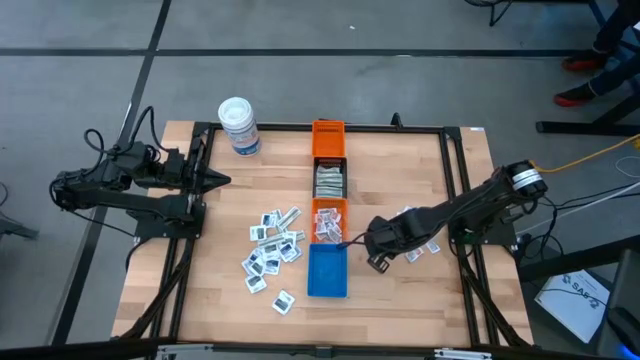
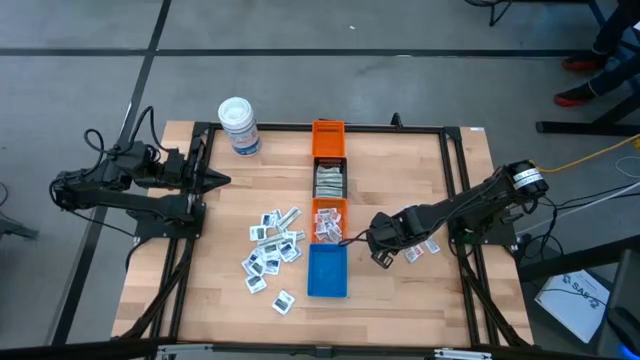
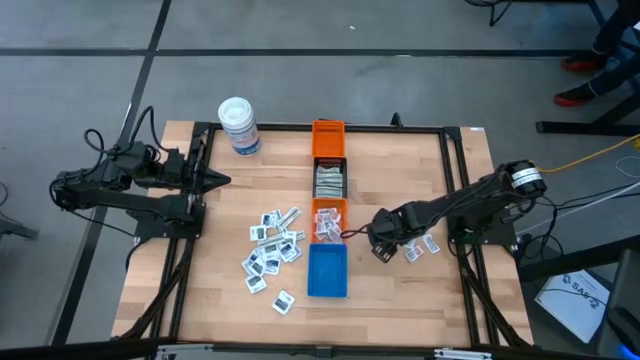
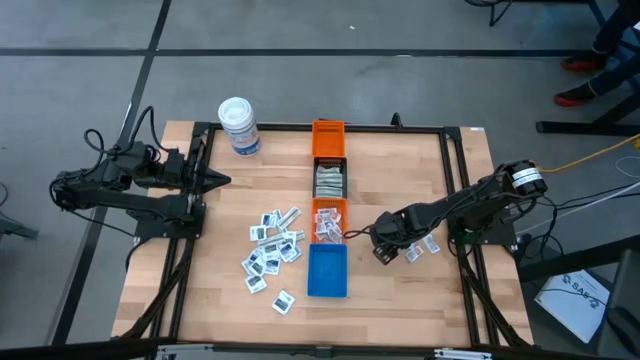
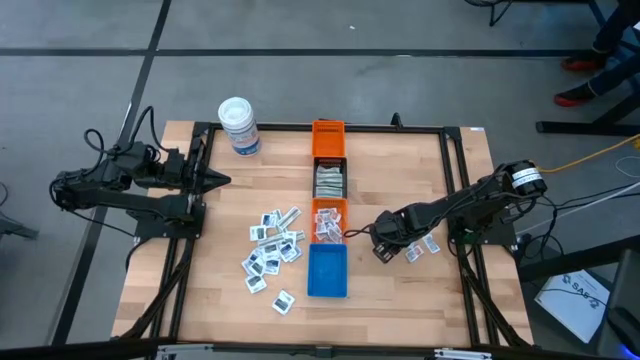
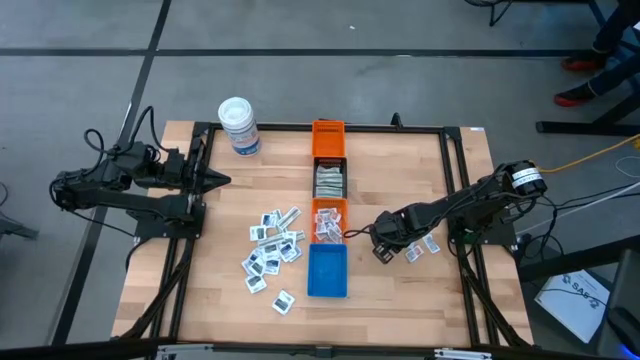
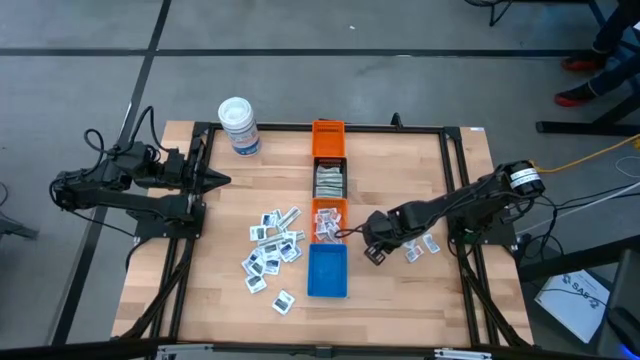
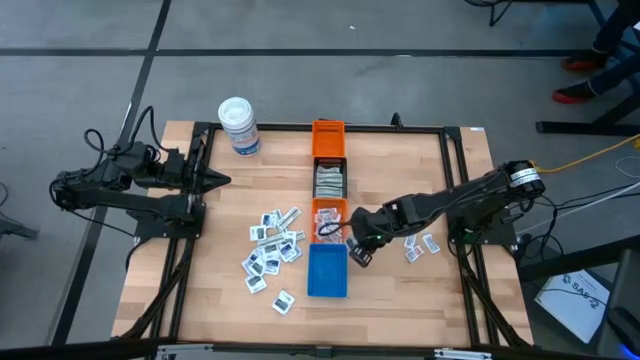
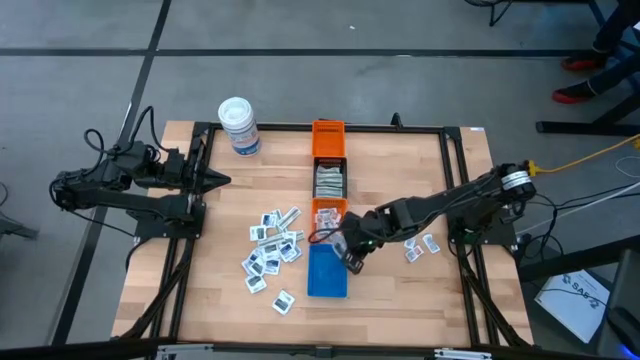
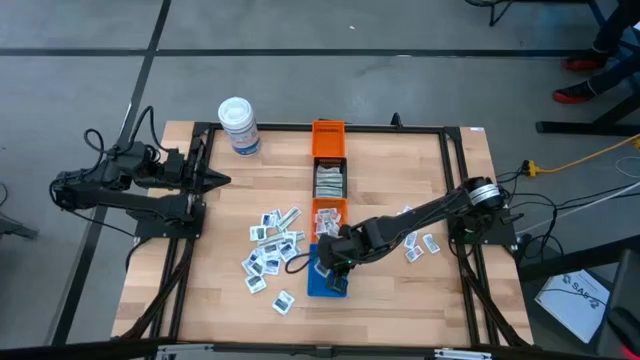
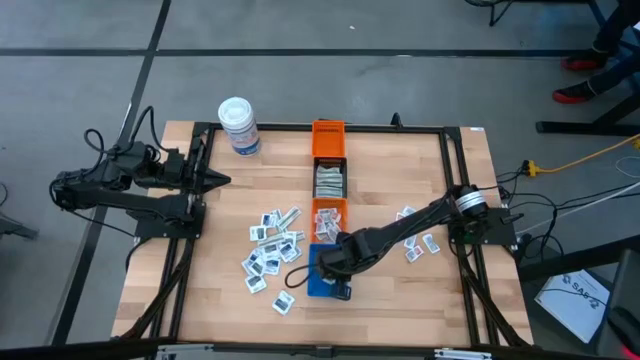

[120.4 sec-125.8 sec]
Task: Pick & Place First Aid Supplies
Put the gray towelette pack into the blue bin

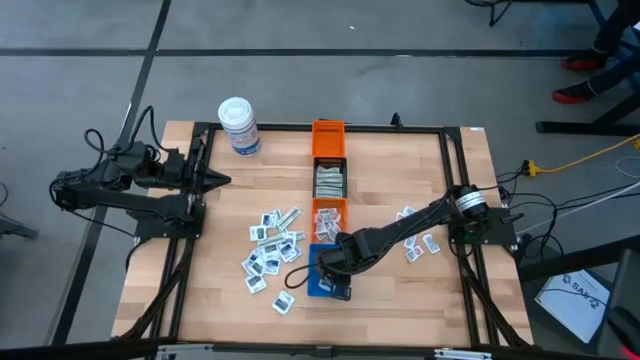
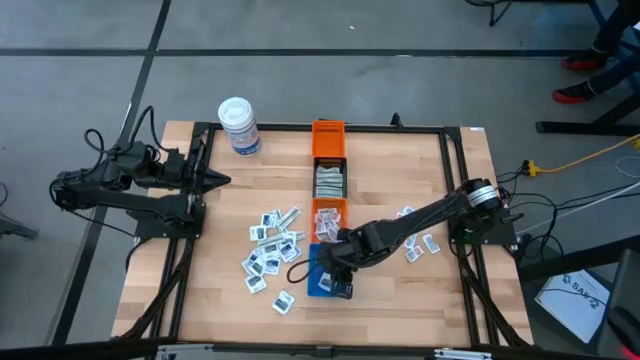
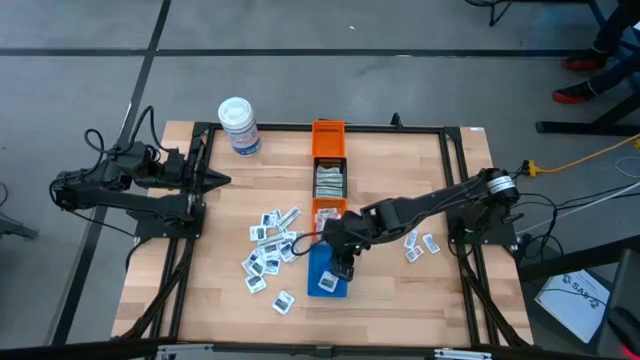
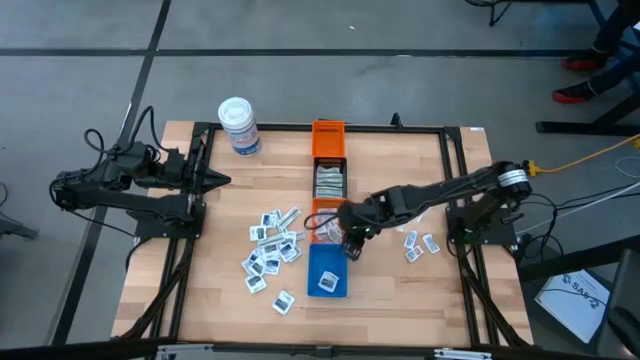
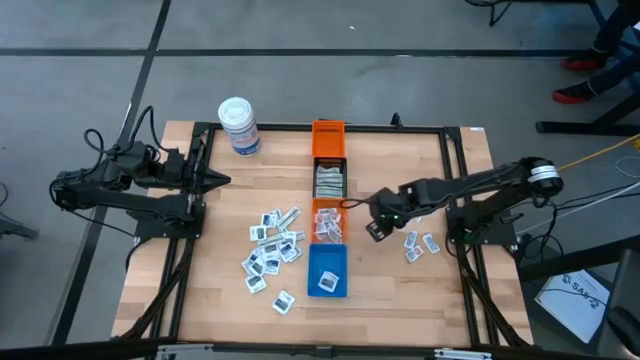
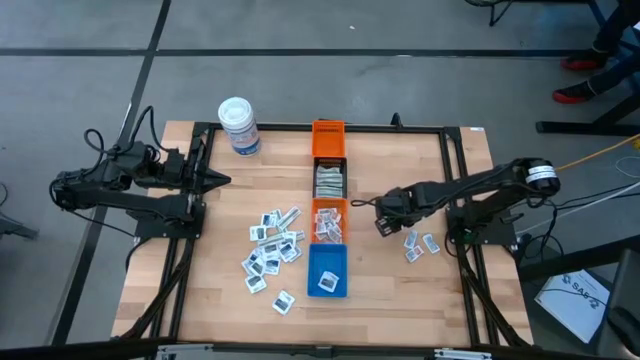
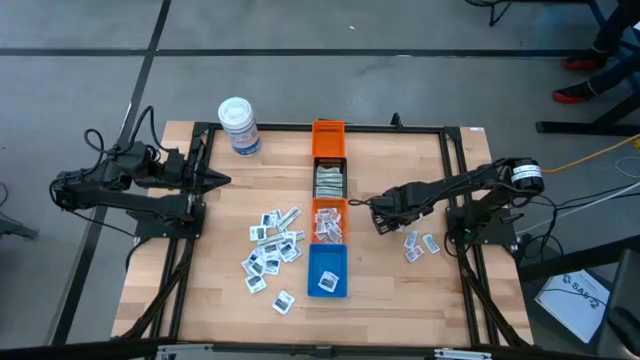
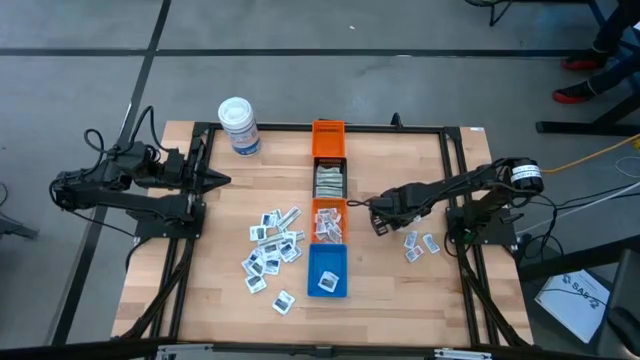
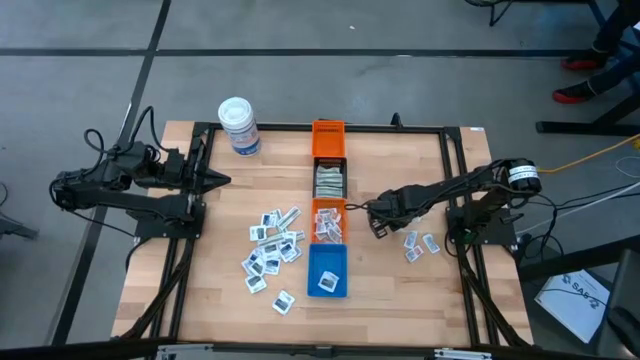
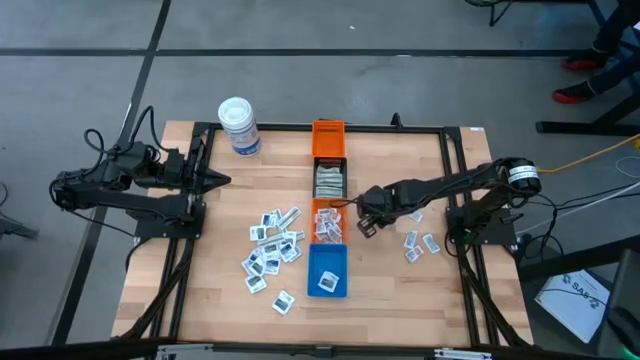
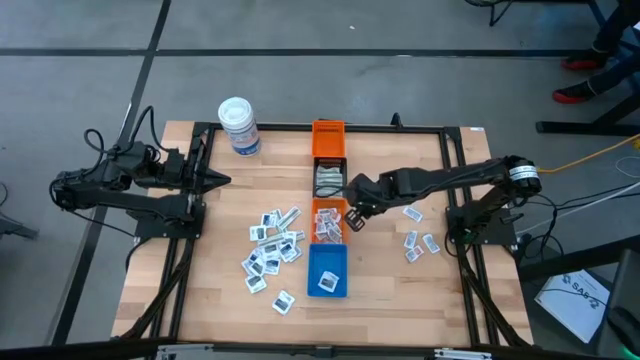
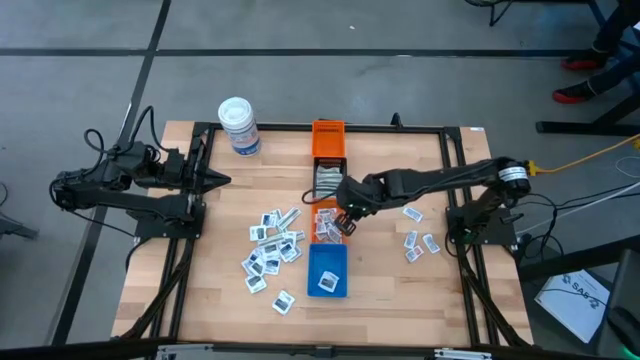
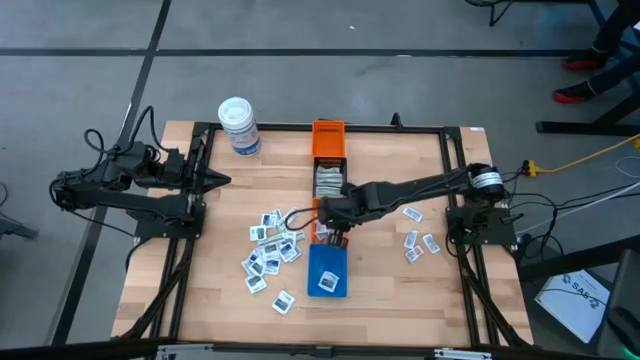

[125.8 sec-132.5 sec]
Put the orange ointment pack into the bottom orange bin

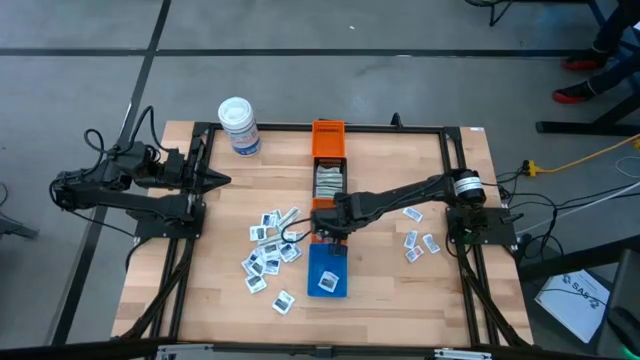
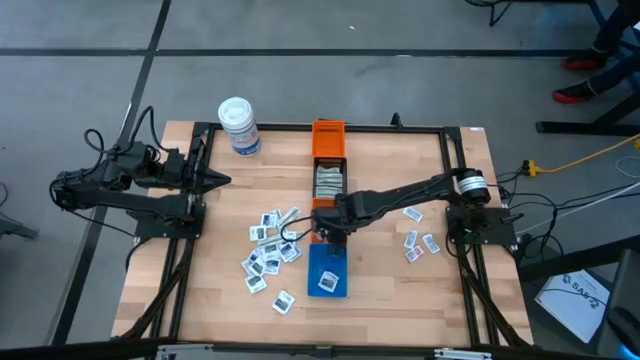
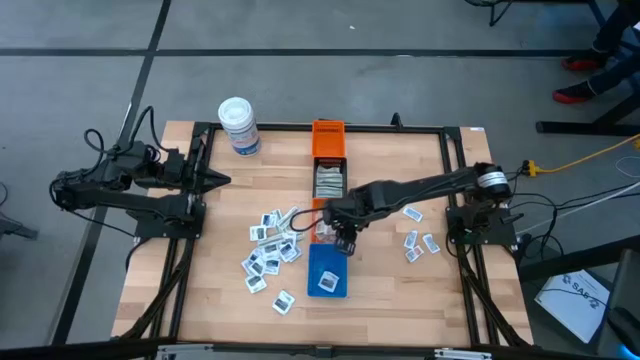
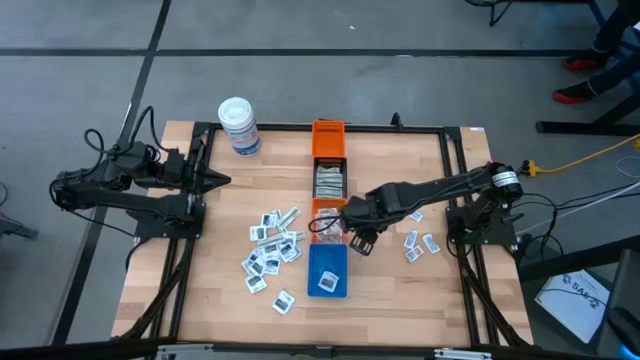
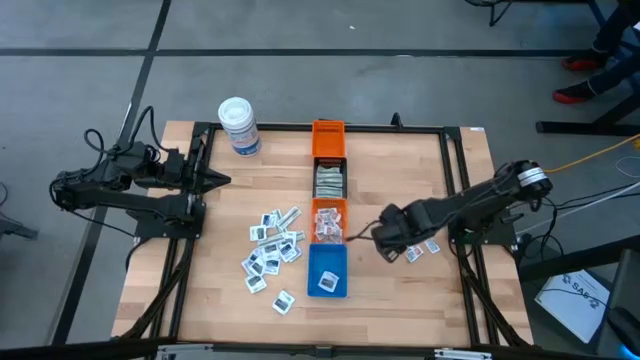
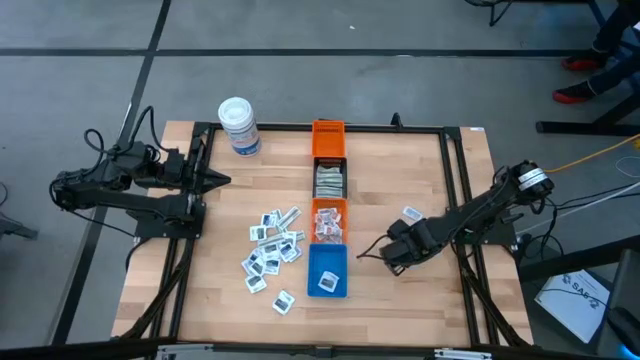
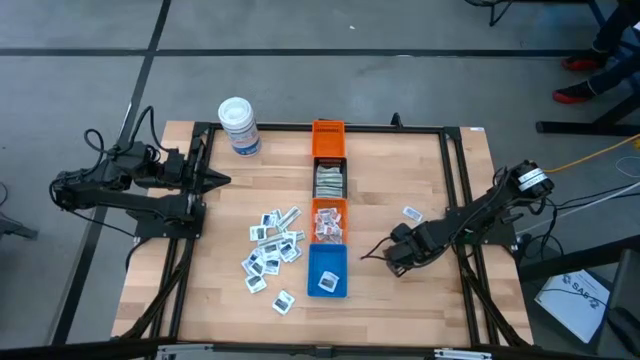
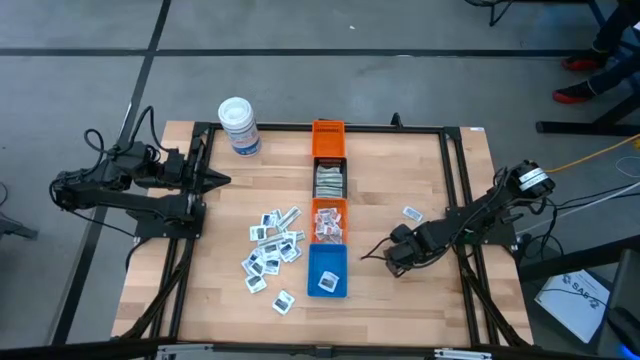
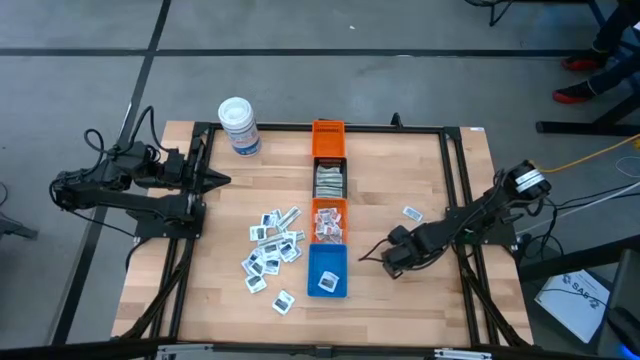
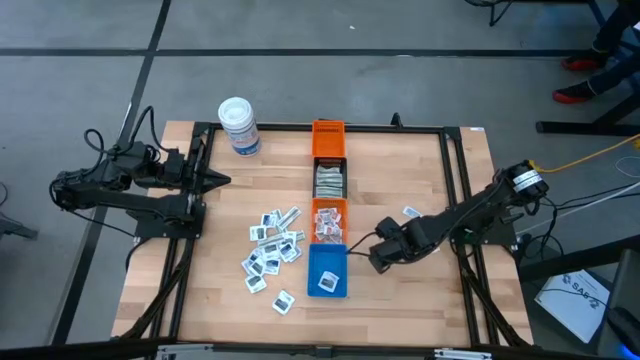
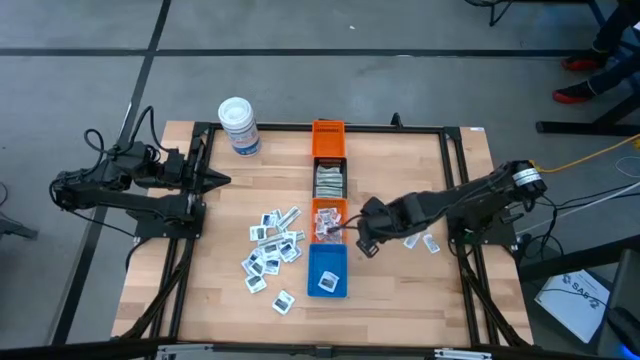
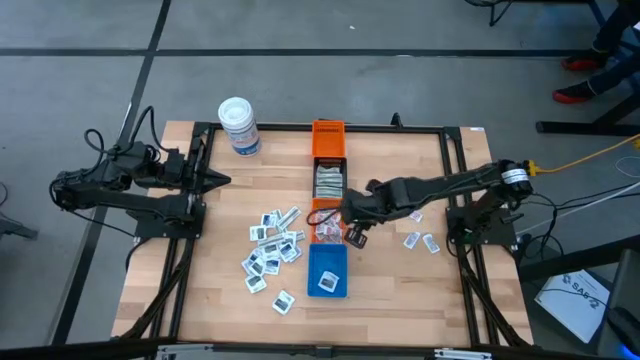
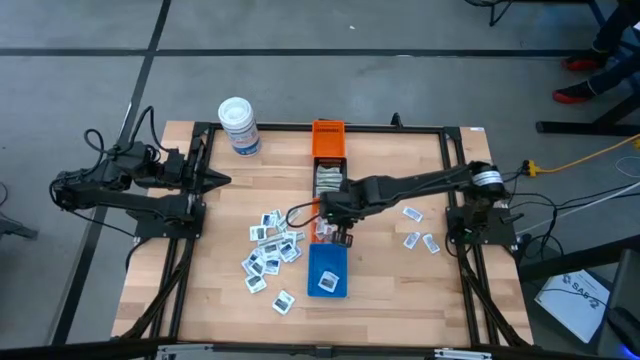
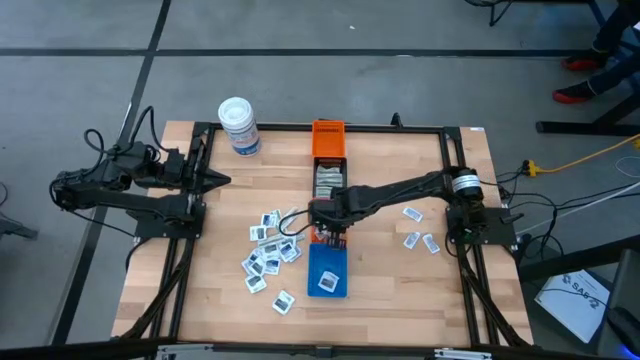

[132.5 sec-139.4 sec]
Put the orange ointment pack into the bottom orange bin

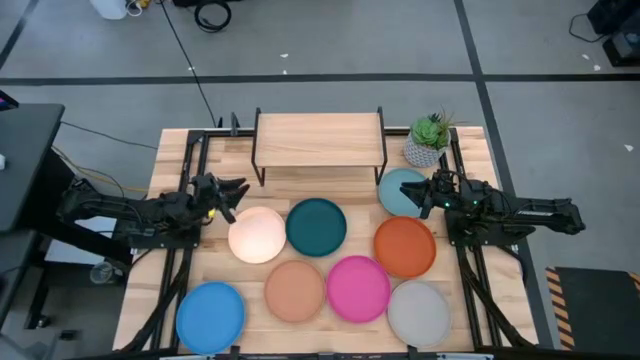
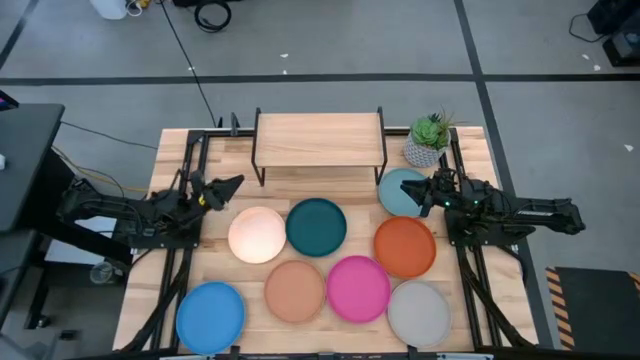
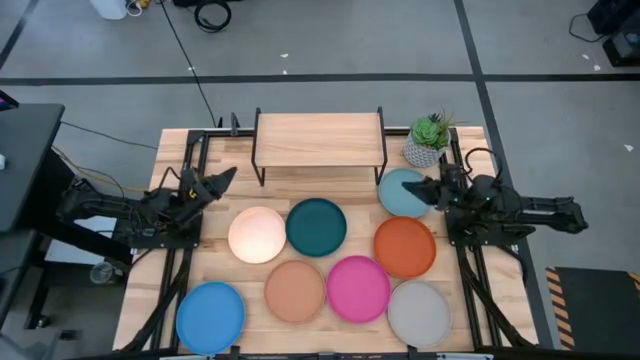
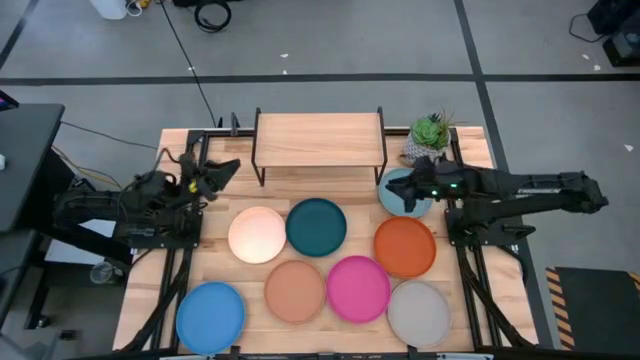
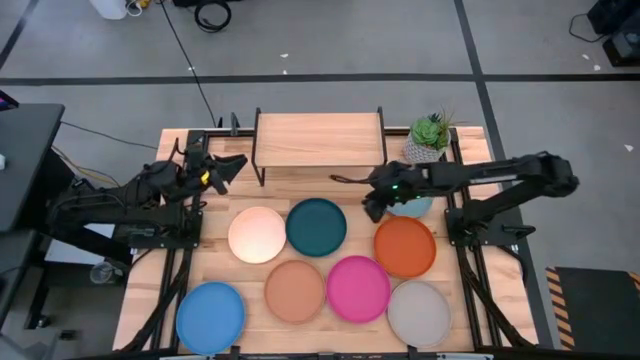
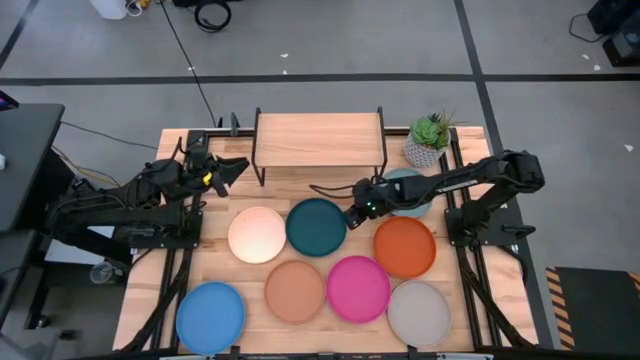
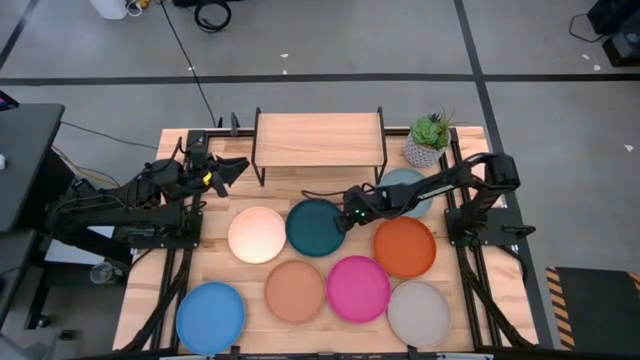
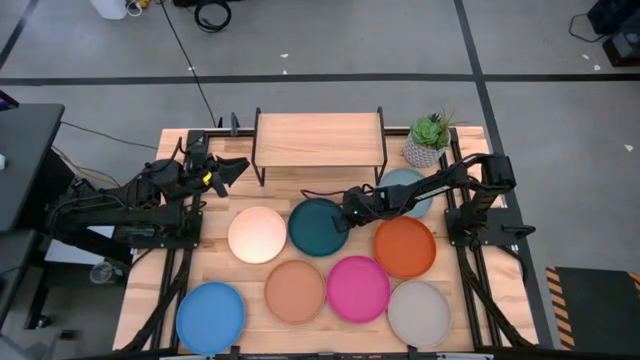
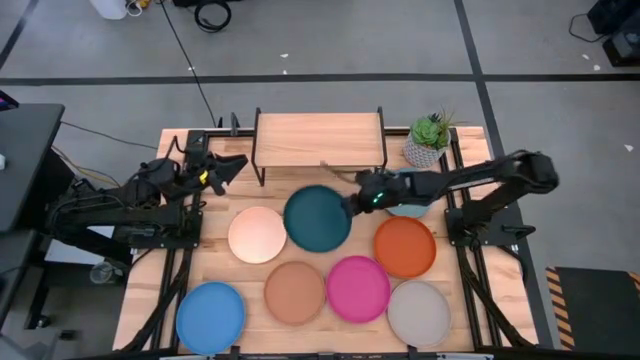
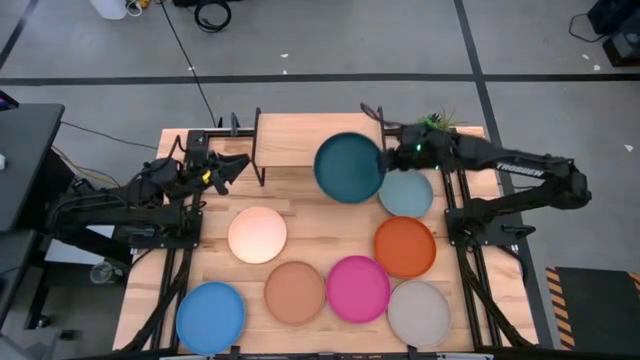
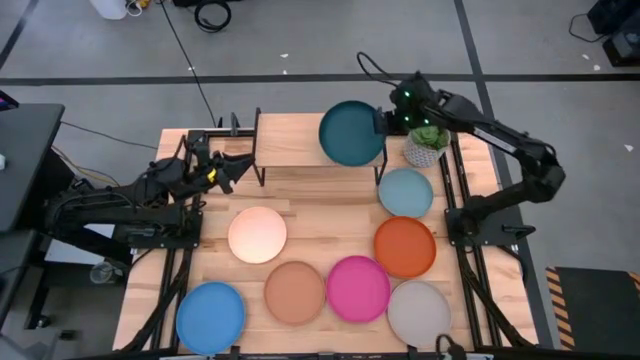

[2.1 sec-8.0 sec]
Task: Place and stack plates onto a shelf
Put the dark blue plate on the shelf
